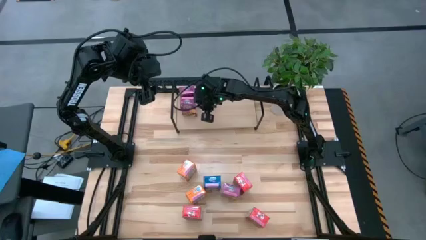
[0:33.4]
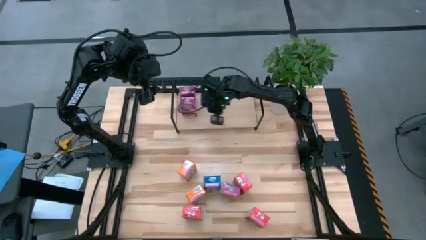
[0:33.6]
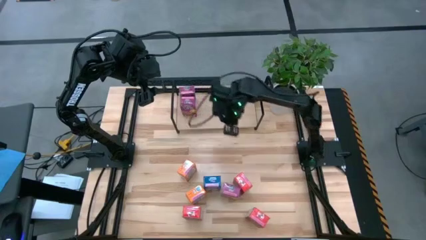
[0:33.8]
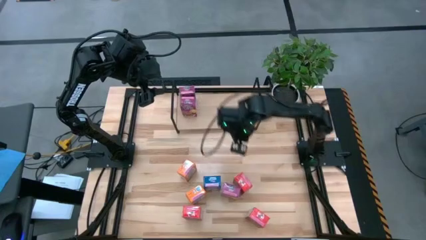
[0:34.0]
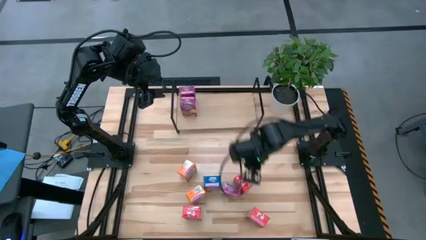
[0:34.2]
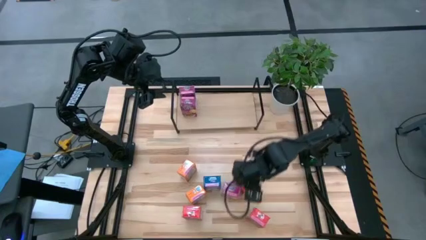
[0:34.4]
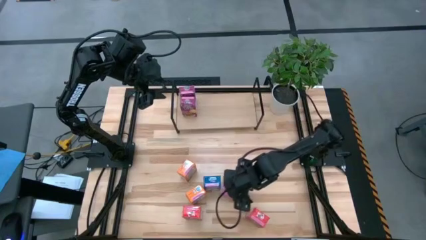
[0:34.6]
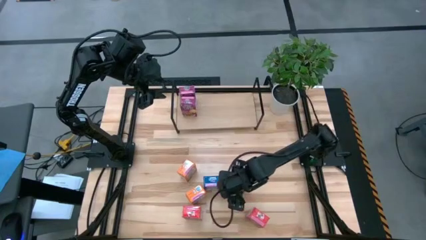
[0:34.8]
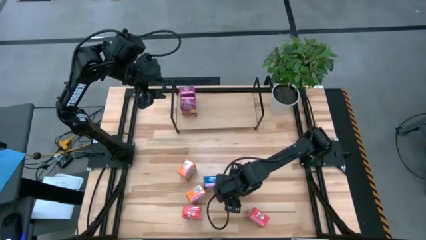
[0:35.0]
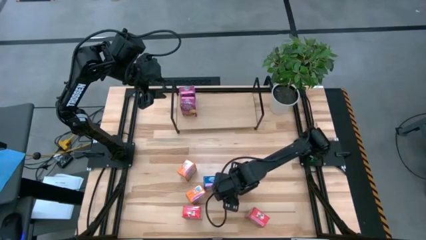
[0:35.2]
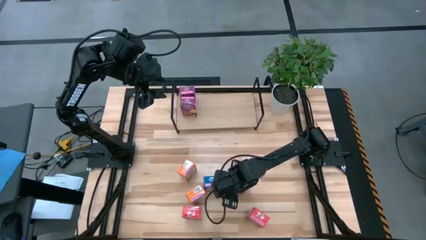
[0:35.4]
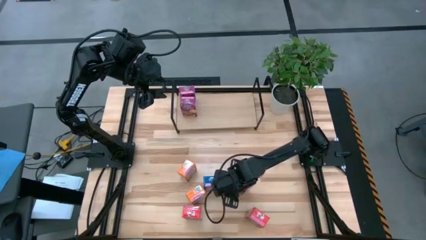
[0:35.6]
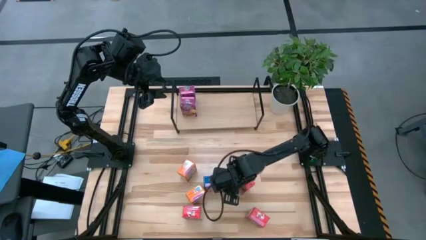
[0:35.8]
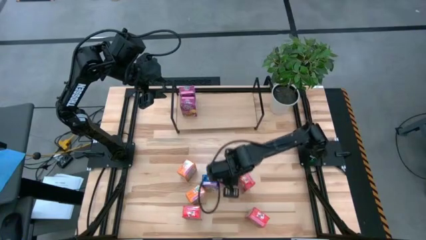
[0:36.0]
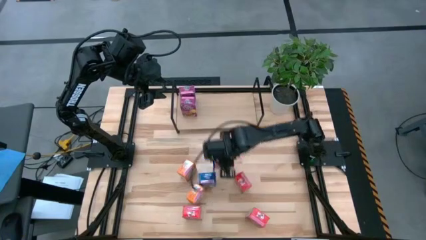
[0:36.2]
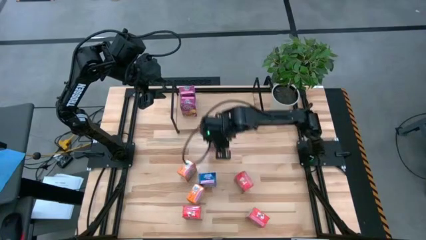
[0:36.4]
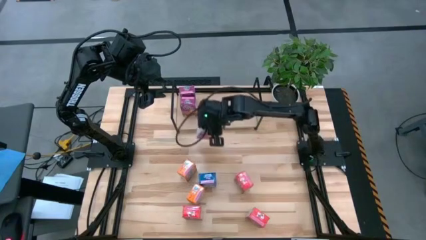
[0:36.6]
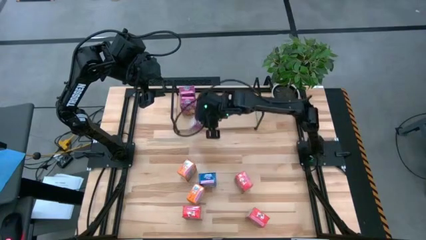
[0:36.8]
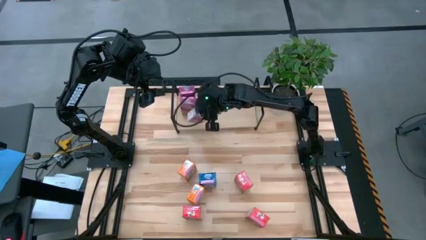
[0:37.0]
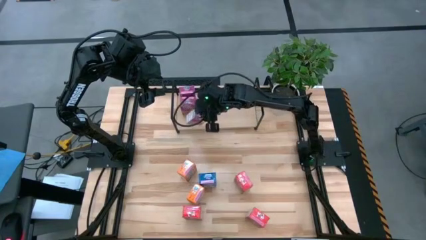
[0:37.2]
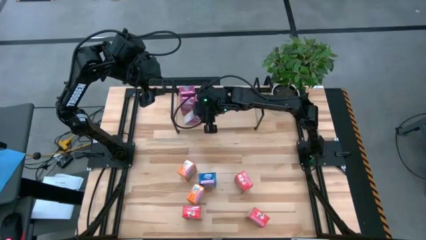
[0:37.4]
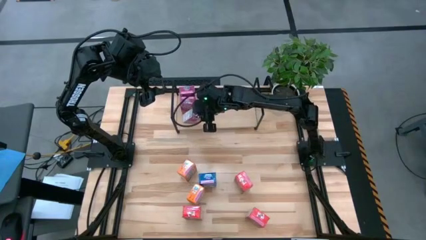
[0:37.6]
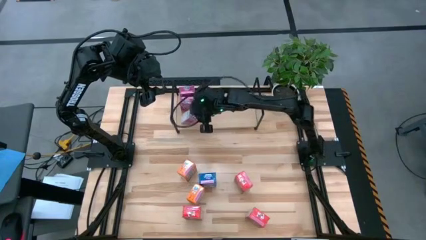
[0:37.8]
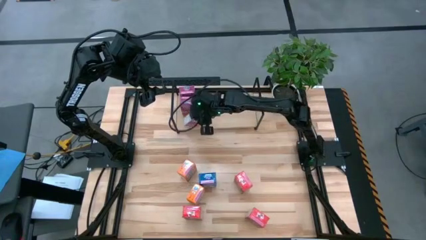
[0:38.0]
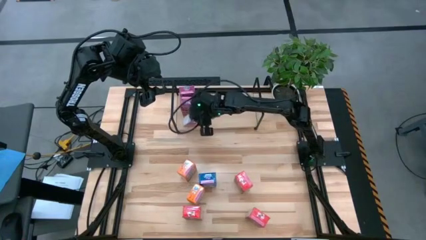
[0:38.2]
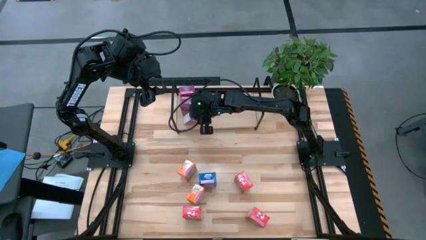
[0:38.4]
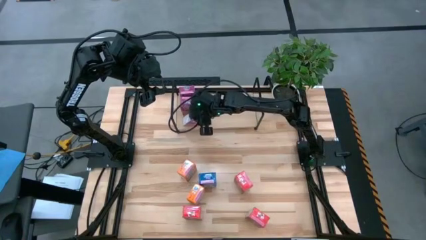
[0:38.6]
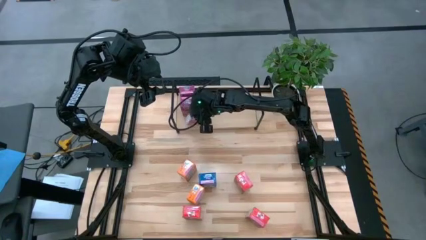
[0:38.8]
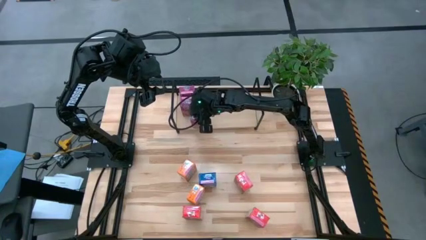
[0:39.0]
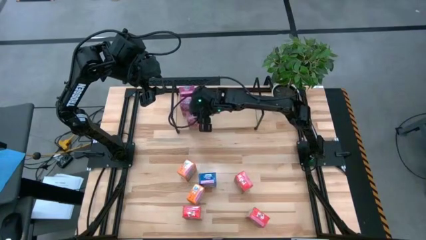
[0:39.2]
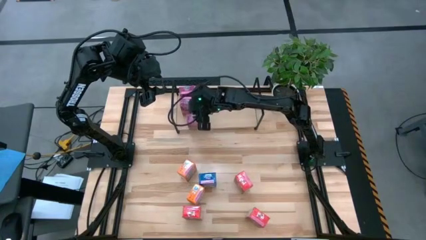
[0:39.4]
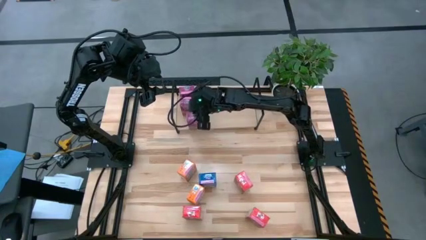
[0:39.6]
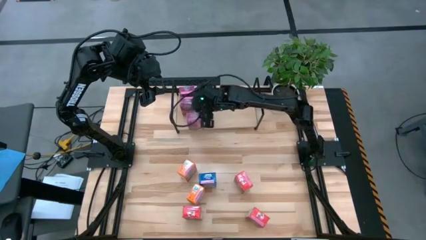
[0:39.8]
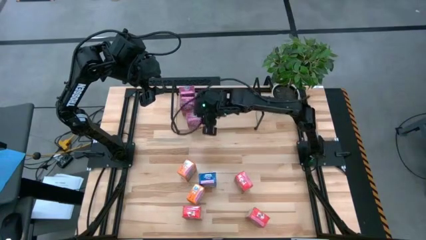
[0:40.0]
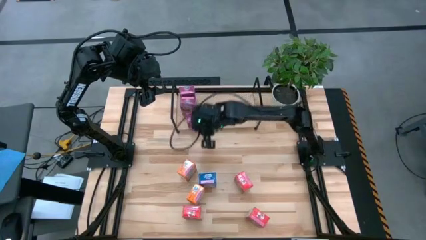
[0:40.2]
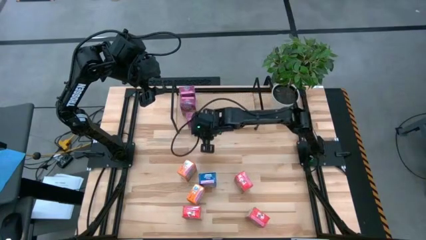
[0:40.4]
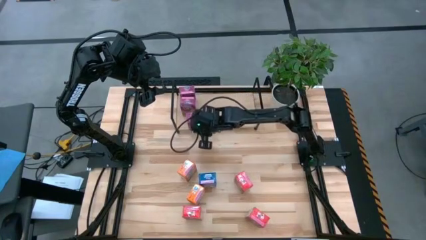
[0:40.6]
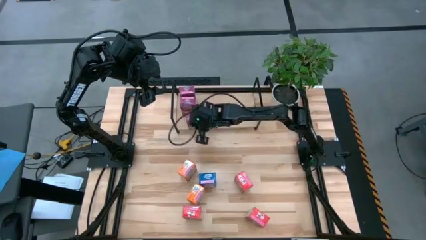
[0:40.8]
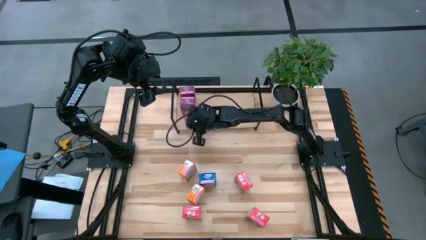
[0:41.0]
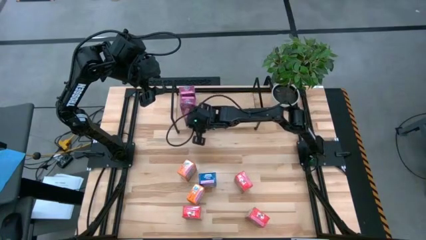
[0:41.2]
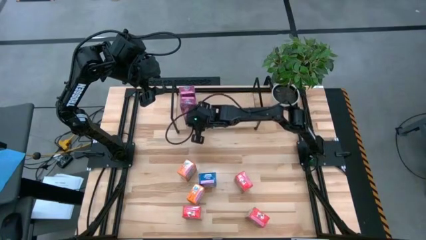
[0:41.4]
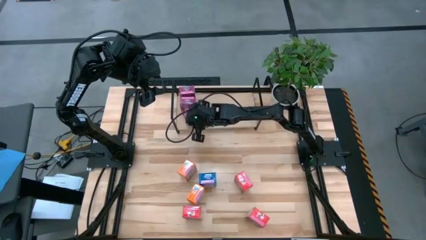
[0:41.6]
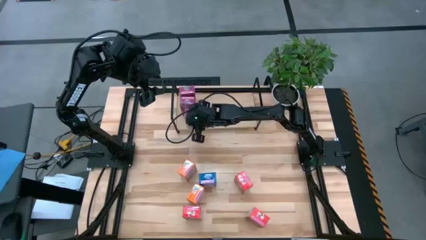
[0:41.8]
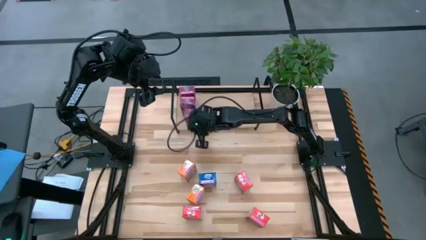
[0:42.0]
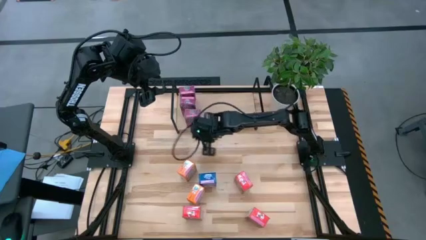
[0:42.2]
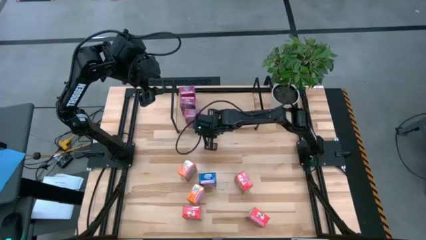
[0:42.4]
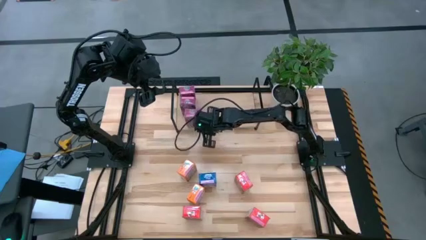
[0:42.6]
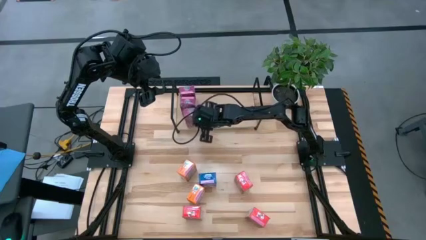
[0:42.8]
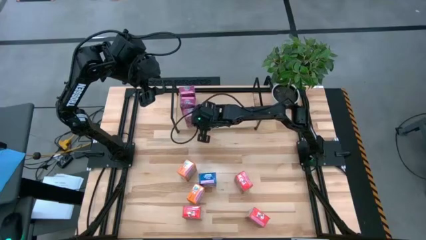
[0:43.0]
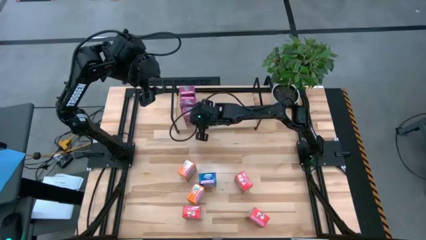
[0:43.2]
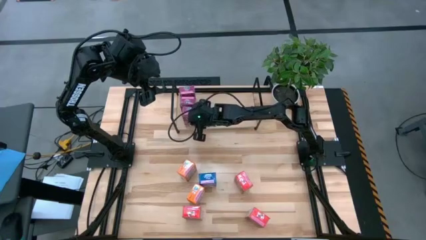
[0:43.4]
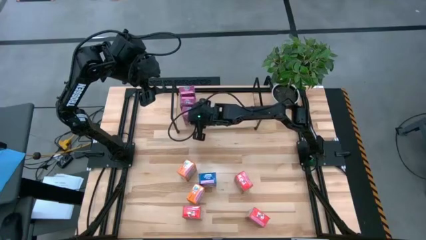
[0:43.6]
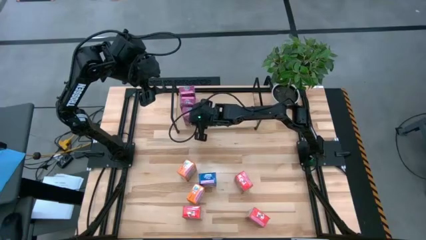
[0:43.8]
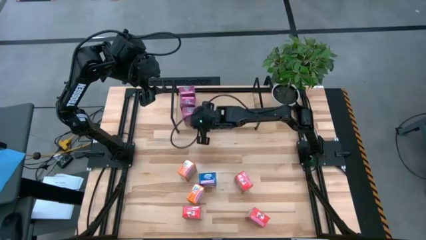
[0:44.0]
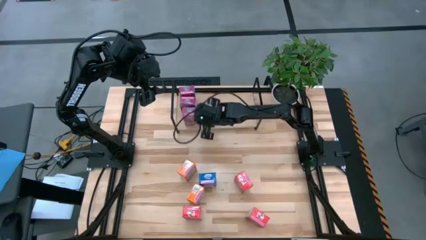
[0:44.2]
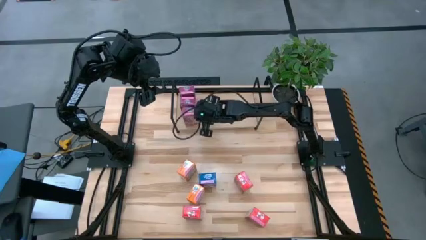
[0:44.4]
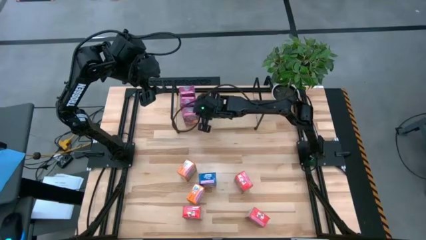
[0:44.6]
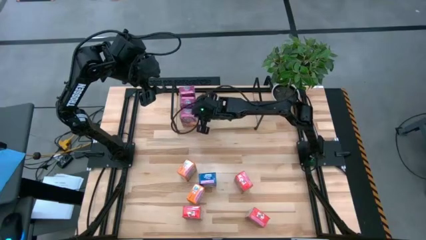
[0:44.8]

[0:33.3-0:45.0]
Task: Stack cereal on shelf
Put the purple cereal box on the shelf aligned with the other purple cereal boxes

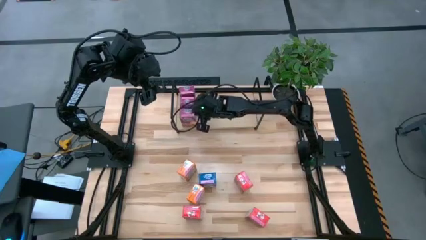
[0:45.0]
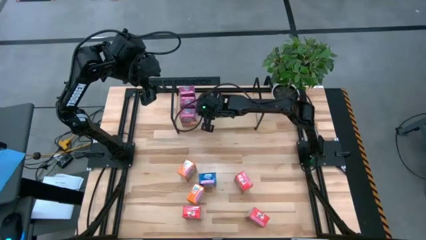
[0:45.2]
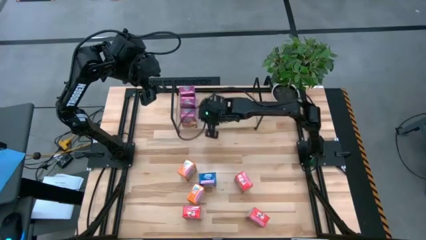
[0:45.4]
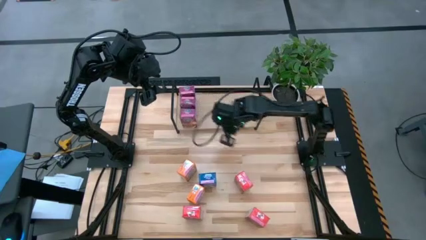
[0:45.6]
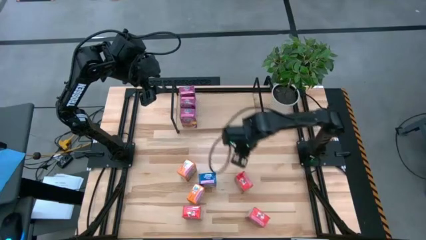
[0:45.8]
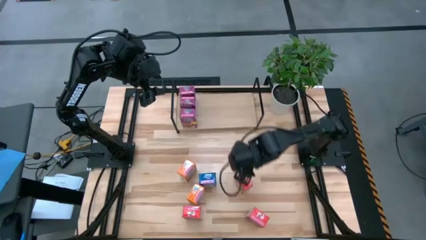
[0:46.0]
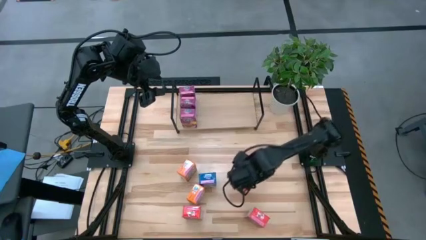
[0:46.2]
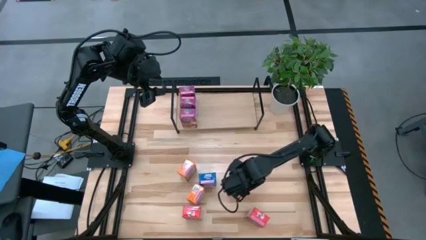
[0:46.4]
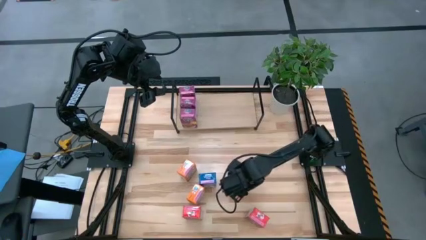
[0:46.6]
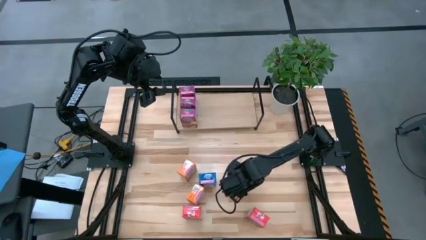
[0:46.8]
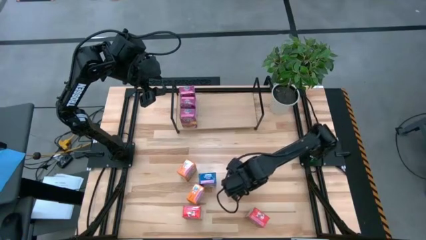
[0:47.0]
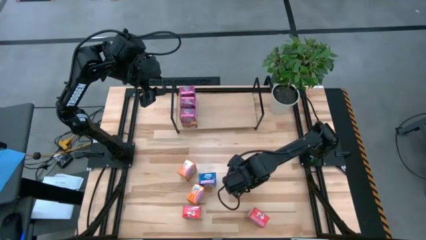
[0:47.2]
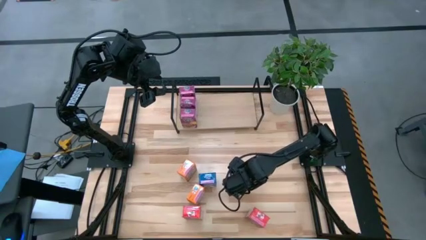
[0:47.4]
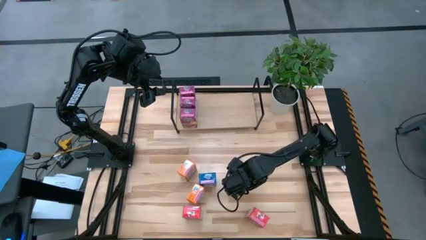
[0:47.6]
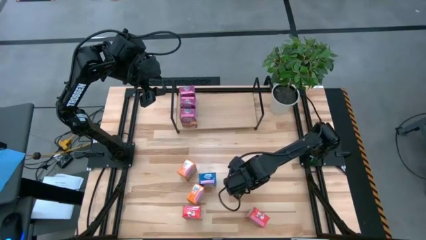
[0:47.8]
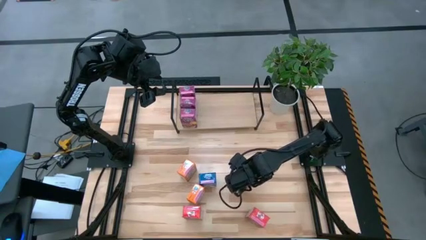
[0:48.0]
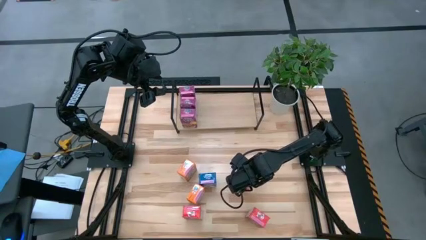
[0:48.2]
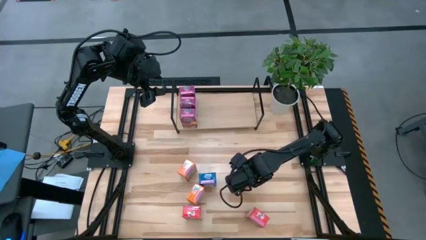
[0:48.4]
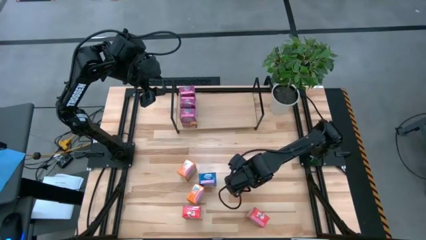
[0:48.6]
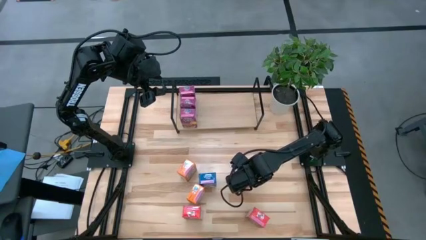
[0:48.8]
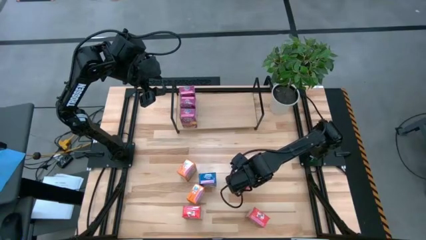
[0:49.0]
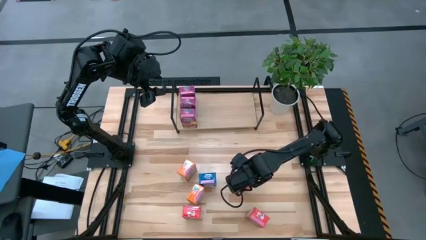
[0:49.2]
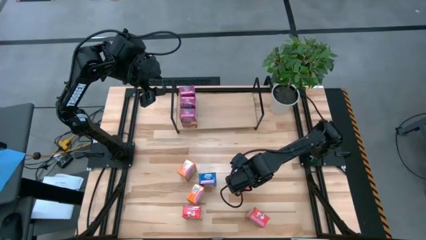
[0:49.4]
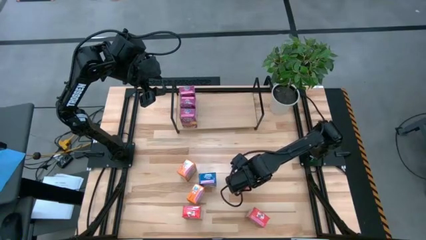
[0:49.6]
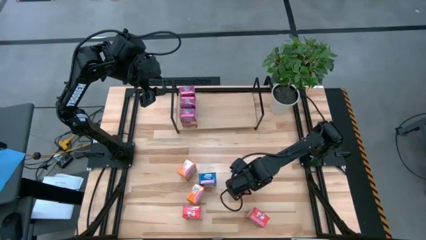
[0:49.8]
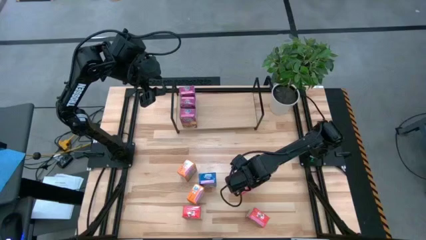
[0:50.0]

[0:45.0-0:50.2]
Put the top red cereal box on the shelf
